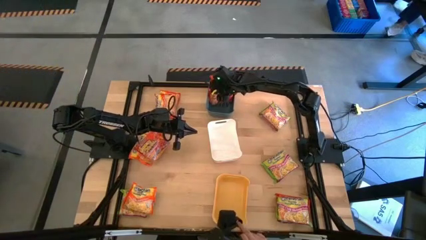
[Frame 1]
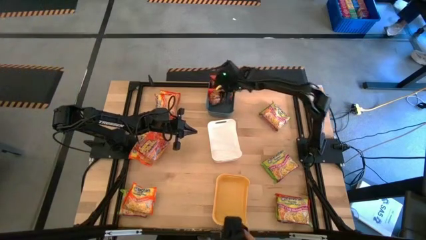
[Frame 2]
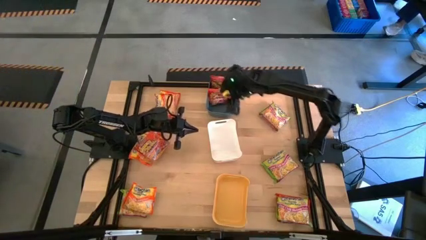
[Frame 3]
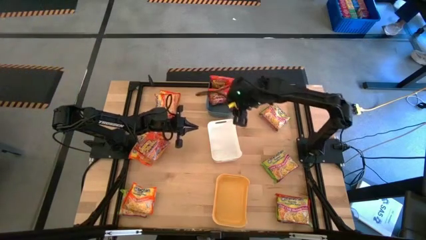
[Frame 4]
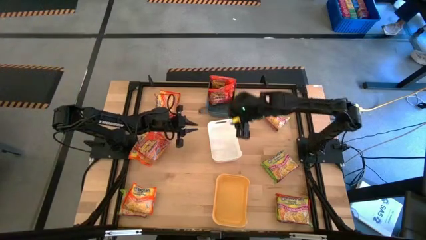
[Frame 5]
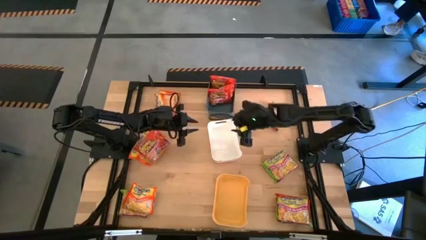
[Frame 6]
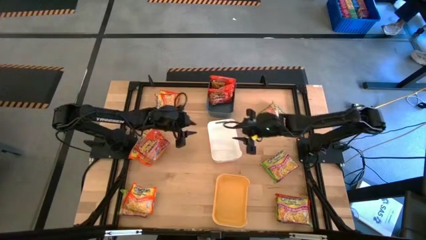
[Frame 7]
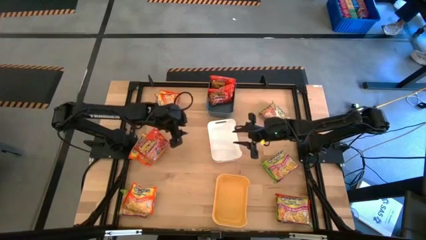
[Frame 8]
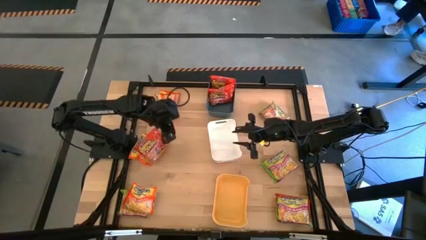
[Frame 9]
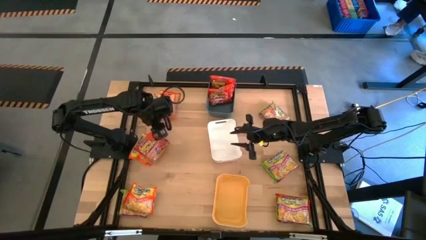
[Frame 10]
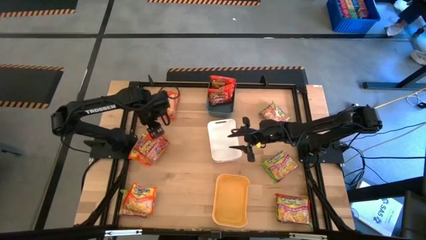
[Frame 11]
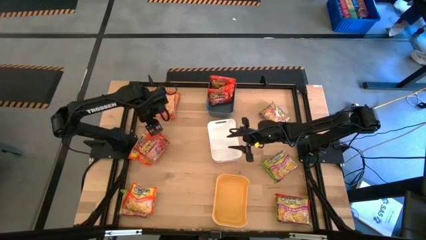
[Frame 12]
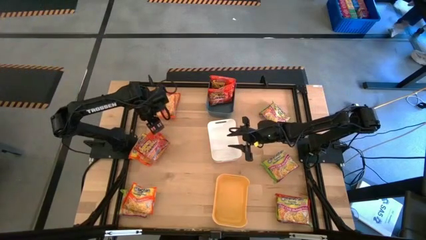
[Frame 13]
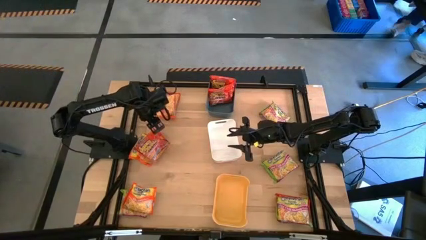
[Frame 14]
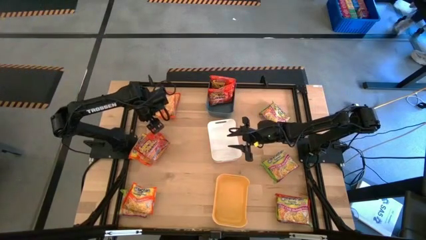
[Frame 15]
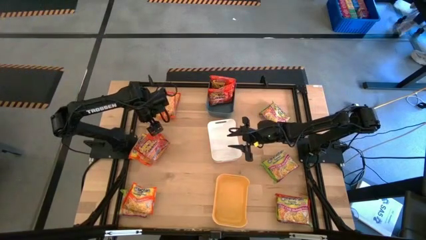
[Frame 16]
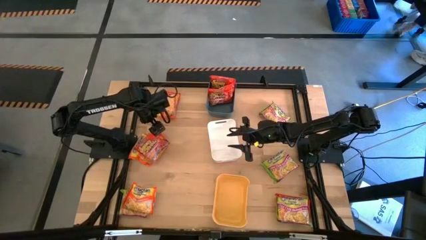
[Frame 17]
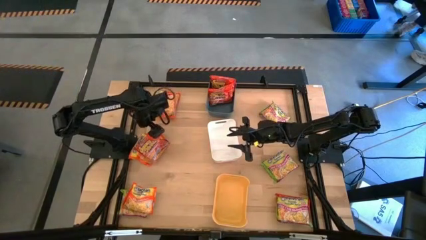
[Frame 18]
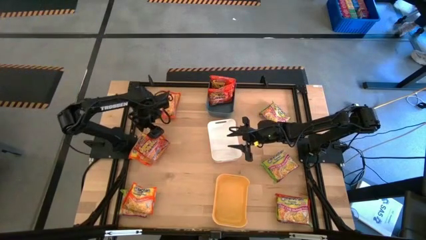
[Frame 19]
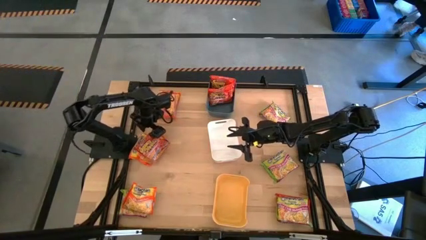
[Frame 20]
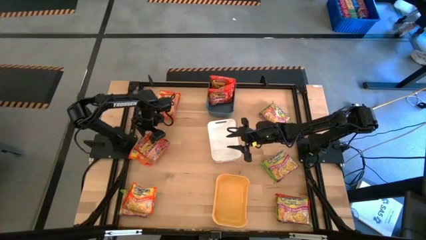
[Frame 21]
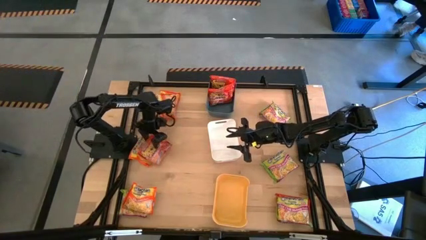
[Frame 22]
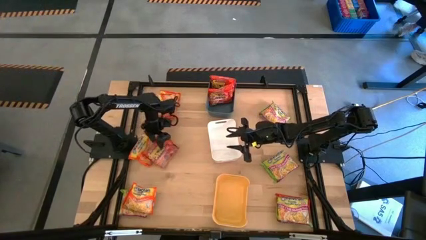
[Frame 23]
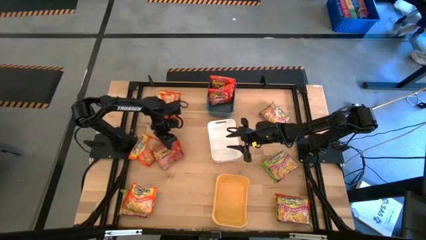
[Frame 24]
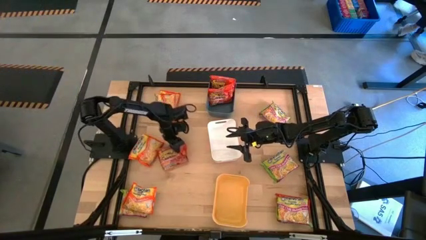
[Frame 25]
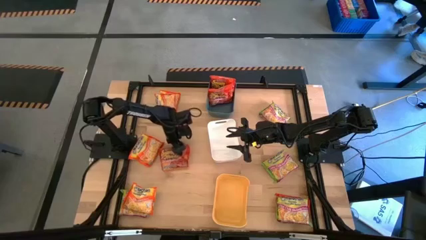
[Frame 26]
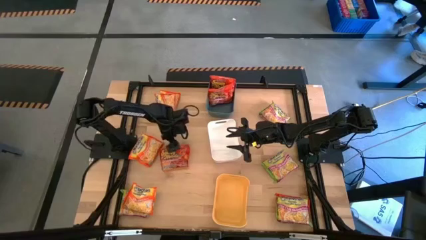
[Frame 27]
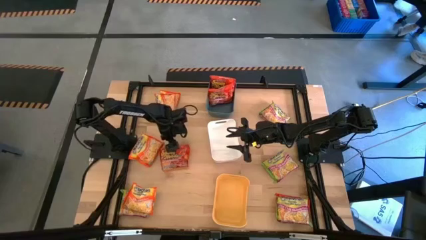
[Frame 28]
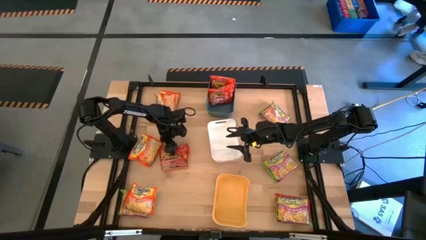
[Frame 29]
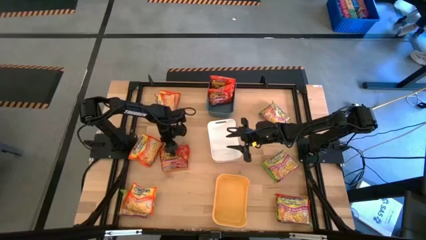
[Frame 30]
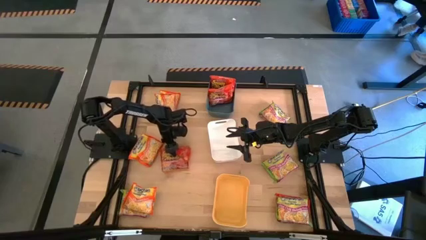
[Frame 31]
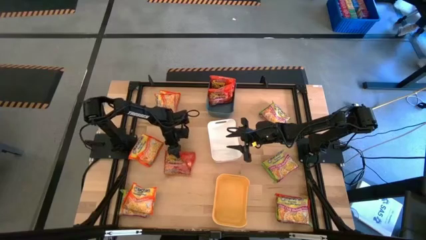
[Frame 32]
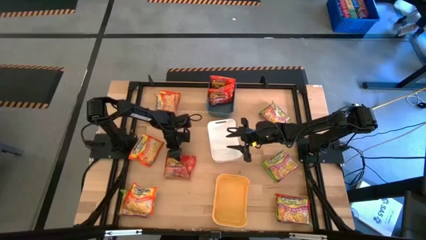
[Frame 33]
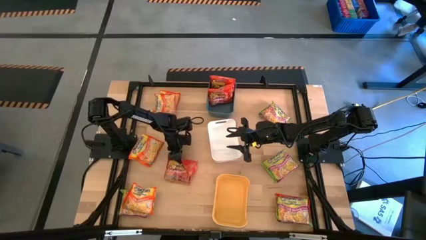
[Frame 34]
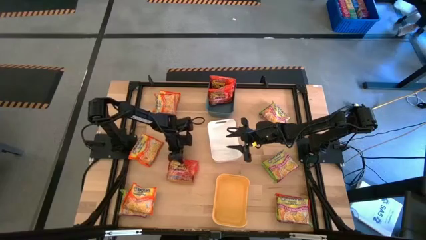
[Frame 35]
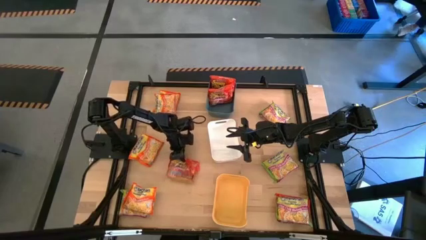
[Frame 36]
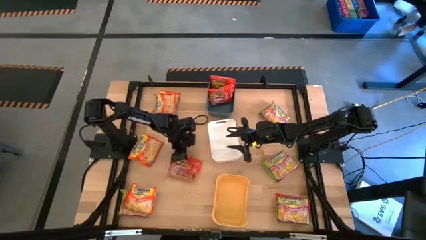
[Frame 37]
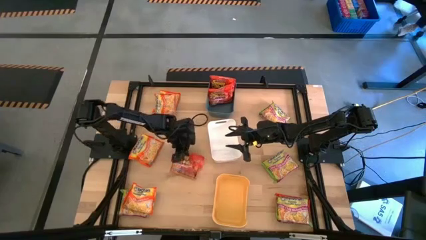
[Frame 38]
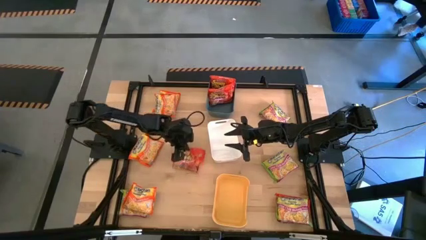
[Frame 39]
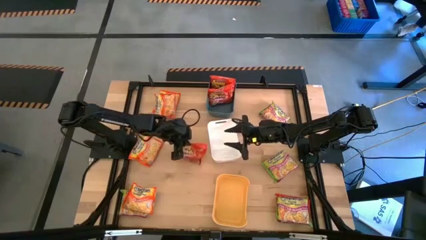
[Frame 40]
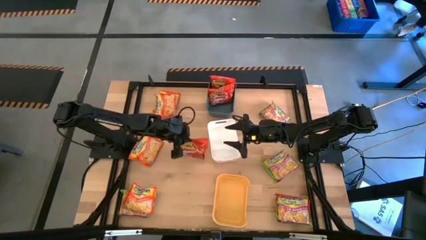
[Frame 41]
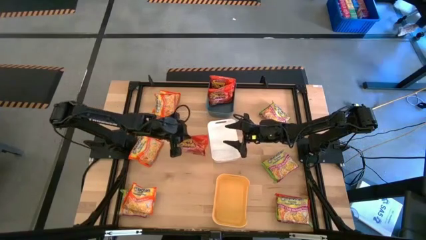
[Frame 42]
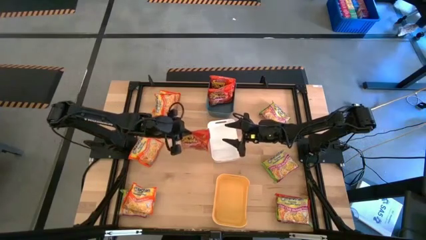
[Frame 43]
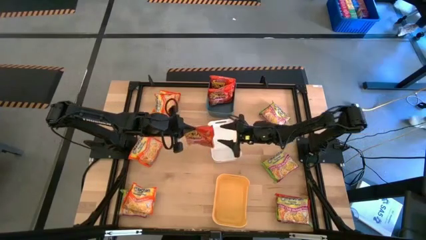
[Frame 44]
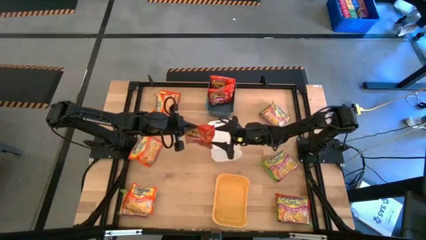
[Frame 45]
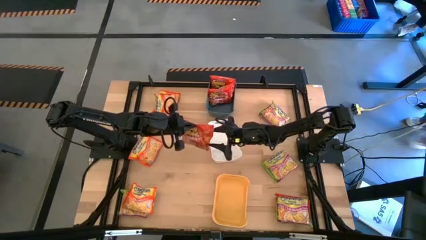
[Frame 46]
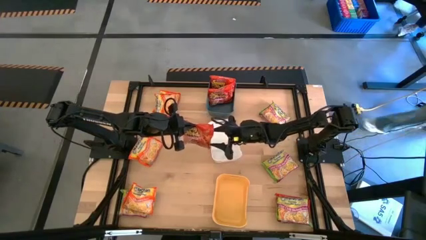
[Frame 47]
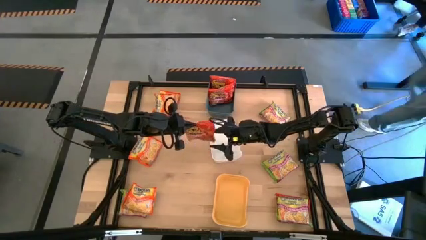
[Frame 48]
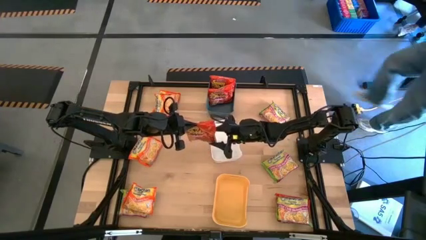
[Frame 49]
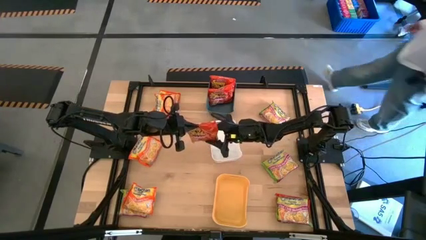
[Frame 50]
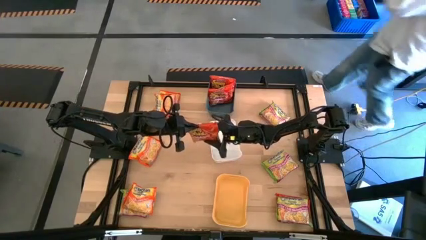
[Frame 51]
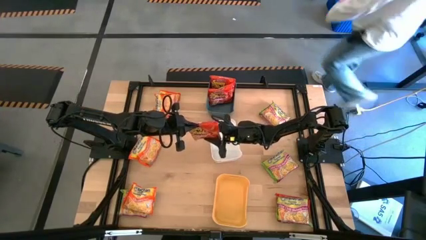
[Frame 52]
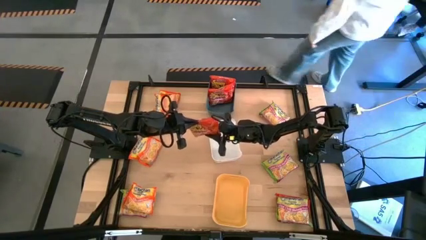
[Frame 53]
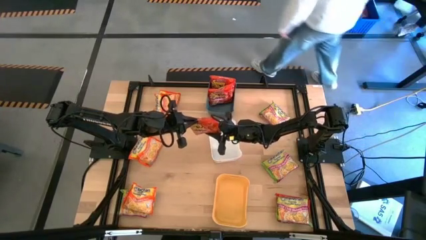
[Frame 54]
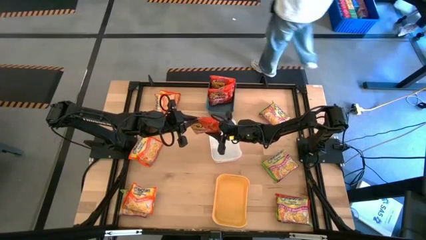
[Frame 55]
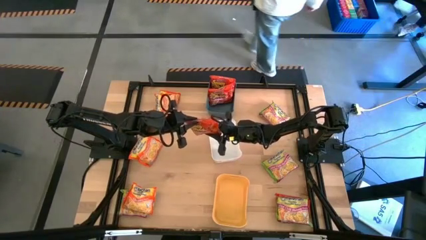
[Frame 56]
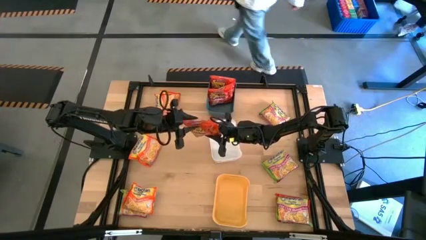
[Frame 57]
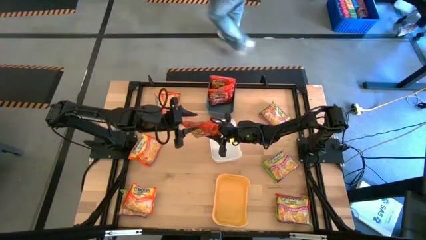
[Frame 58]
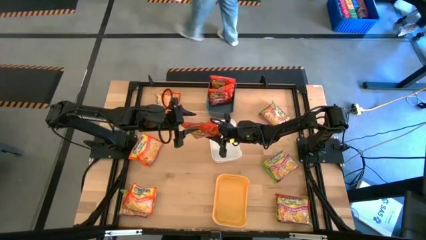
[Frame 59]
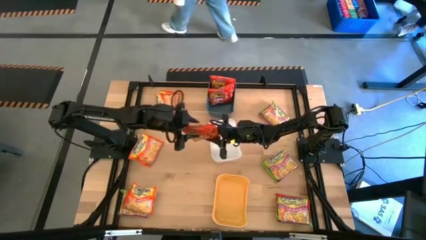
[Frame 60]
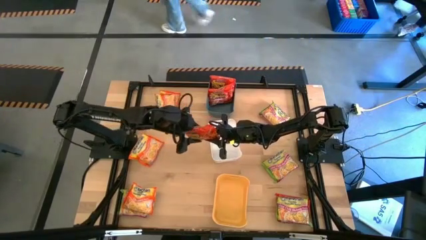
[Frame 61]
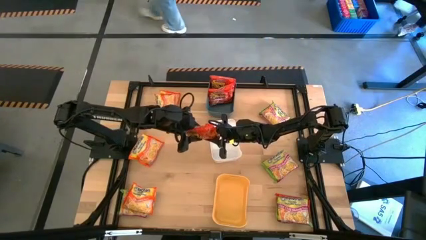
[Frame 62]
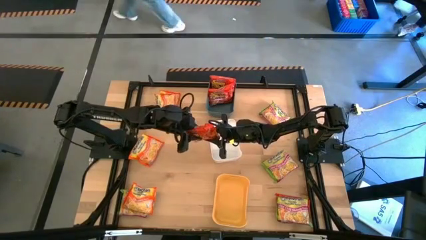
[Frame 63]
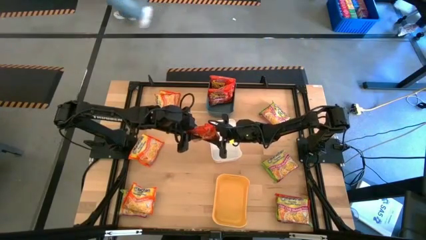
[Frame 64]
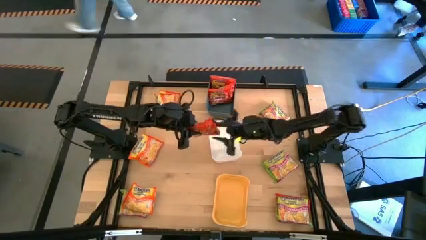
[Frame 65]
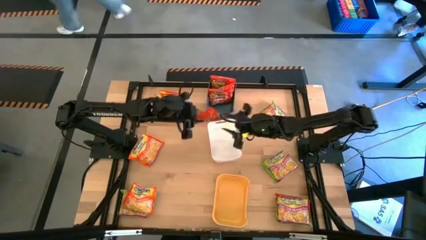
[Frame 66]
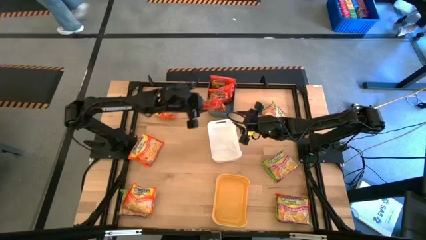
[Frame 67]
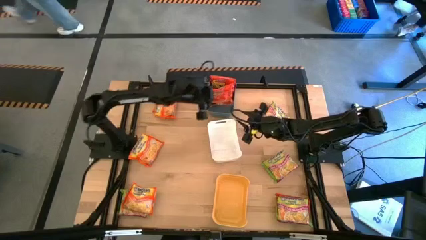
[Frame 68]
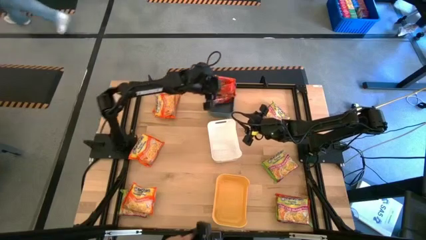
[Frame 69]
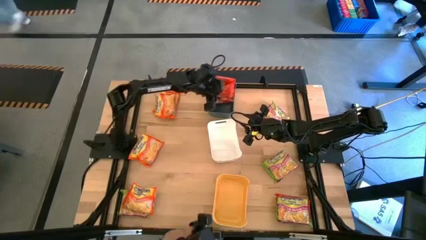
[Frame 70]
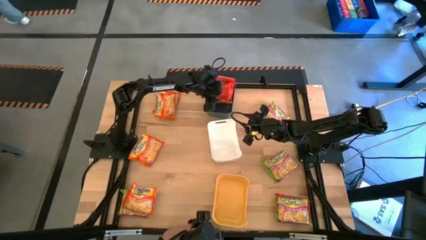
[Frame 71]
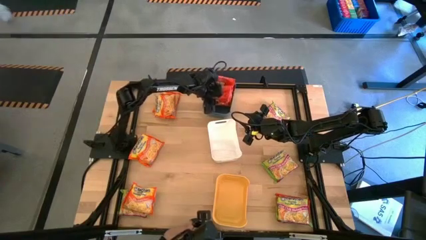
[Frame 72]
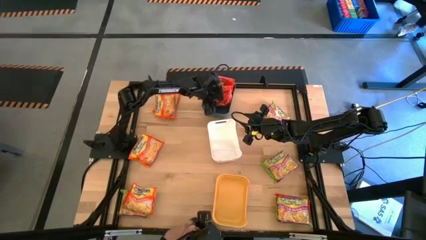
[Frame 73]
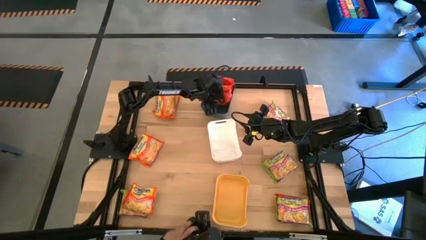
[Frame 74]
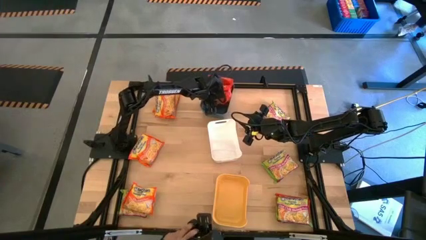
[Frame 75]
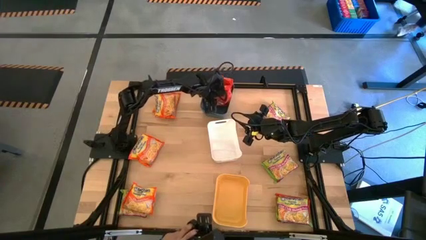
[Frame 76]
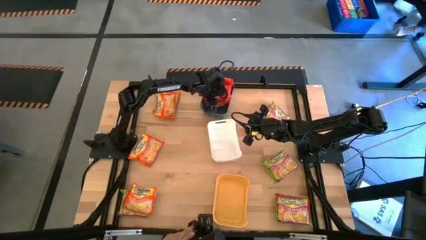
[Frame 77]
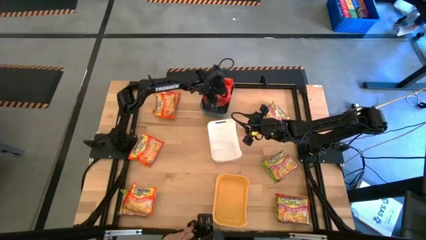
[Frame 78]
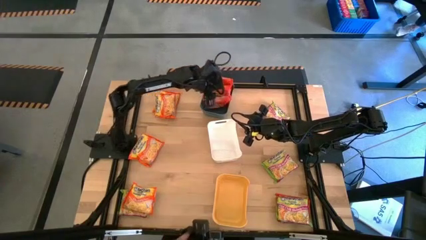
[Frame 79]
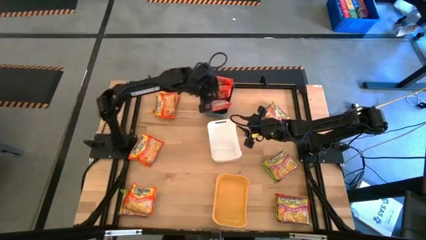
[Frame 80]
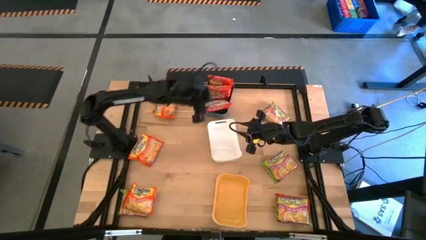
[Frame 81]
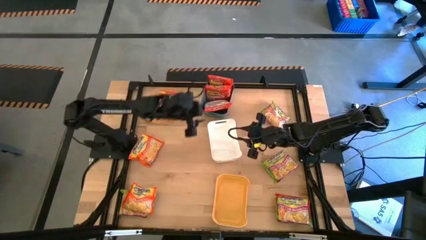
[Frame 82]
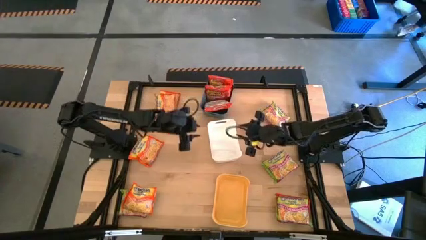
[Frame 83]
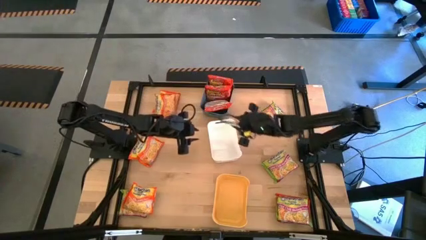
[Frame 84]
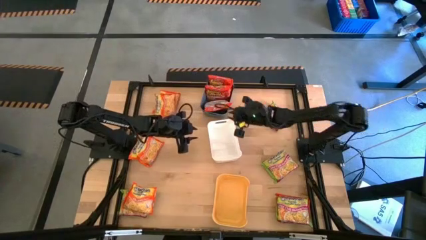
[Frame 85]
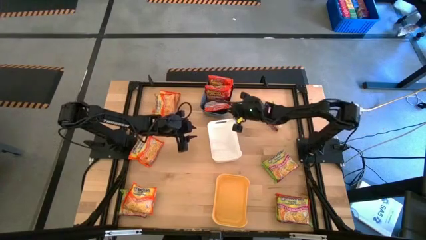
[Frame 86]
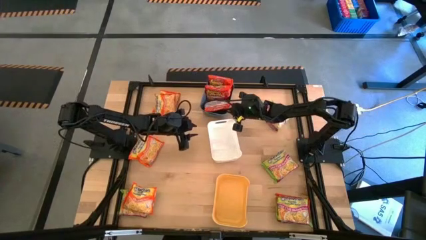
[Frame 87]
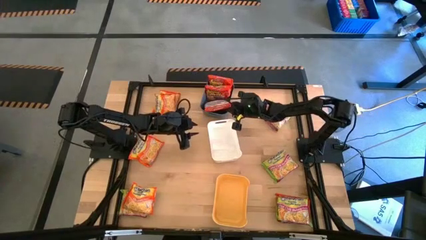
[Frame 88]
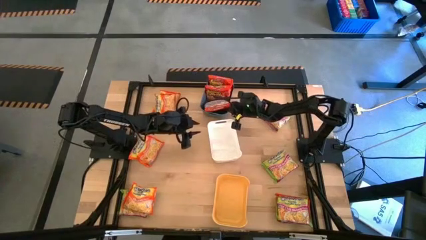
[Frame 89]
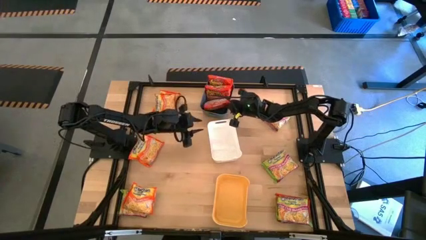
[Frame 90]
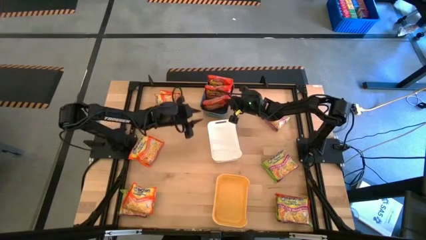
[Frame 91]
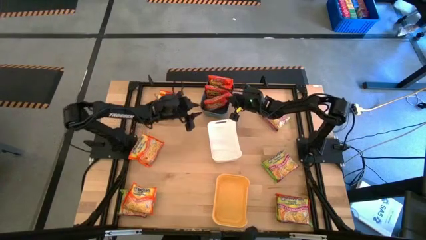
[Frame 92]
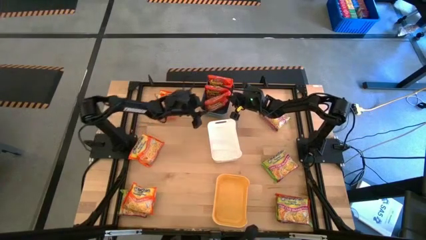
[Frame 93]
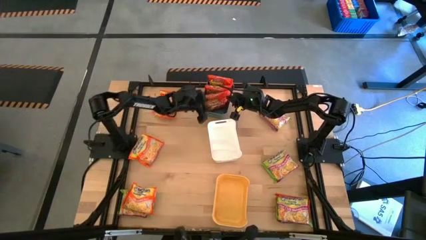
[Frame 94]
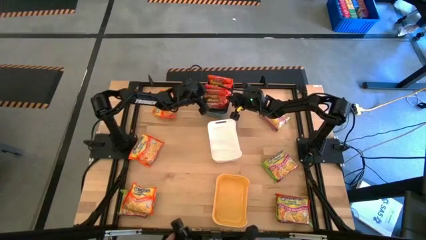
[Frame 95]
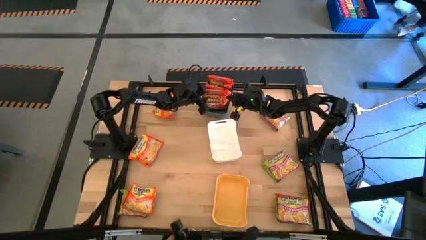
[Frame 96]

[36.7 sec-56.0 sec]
Task: Sort Maruchan noodles
Put the red noodle pack into the blue bin
